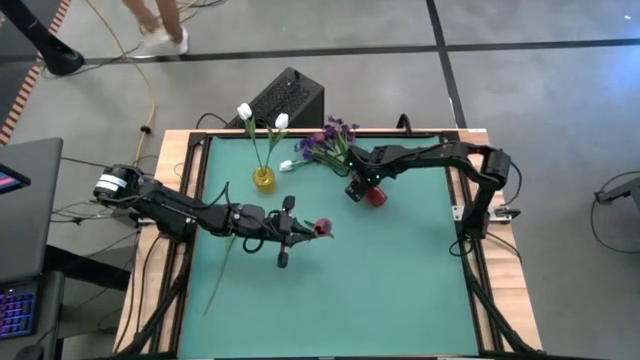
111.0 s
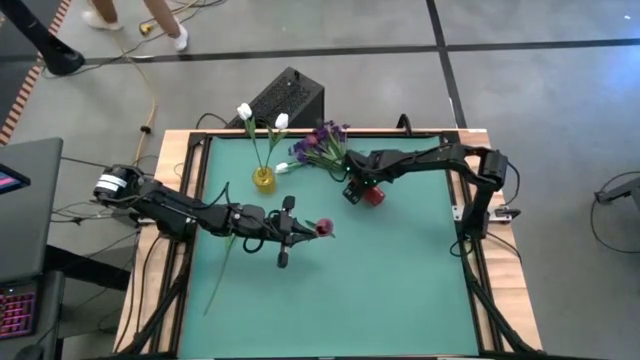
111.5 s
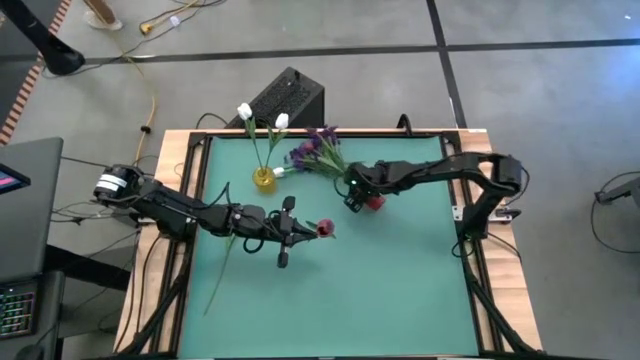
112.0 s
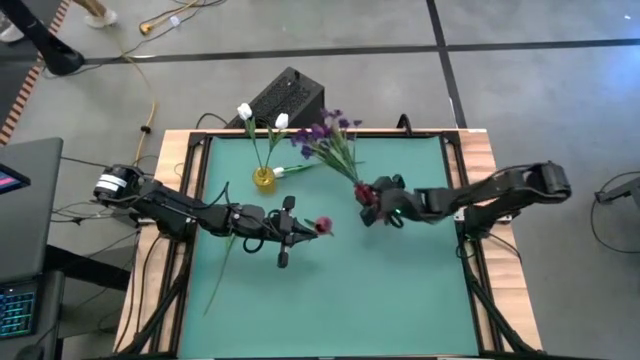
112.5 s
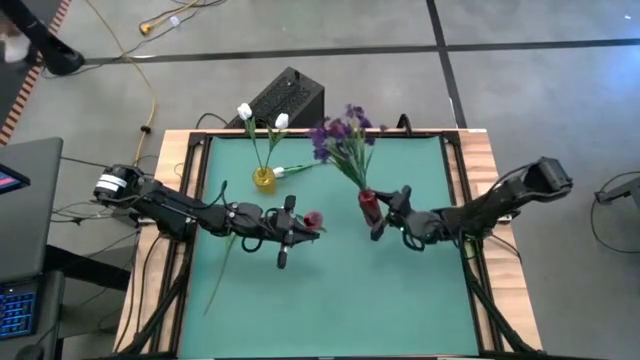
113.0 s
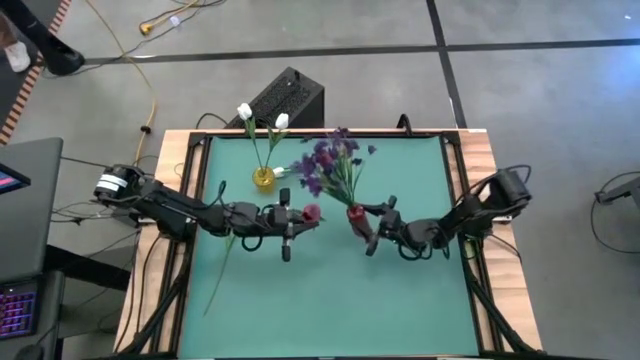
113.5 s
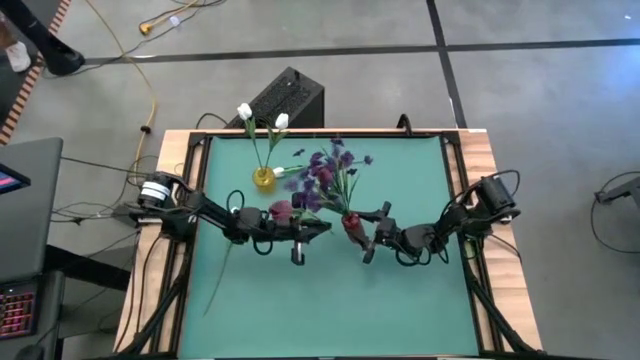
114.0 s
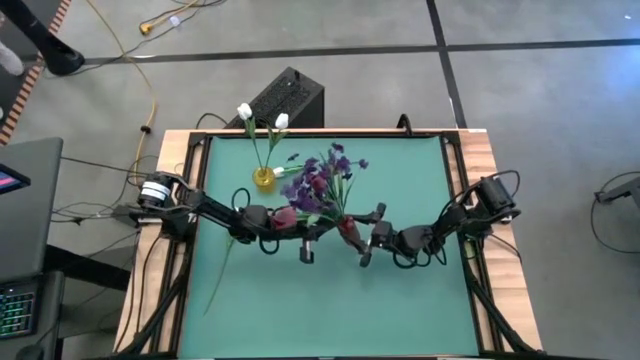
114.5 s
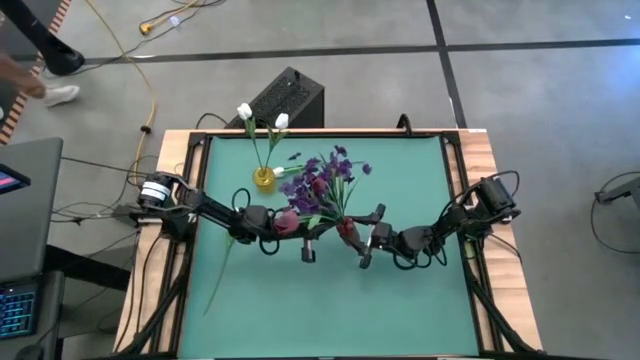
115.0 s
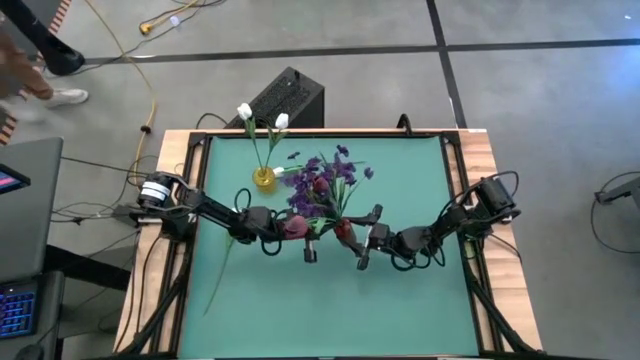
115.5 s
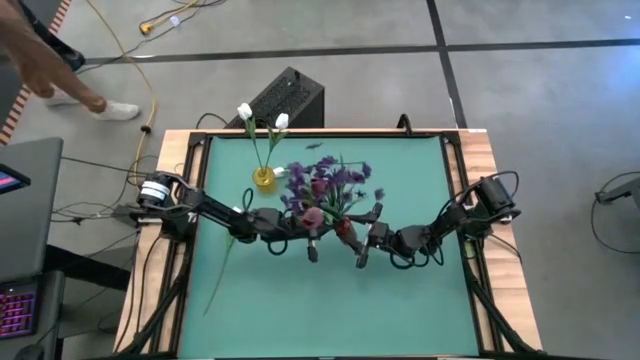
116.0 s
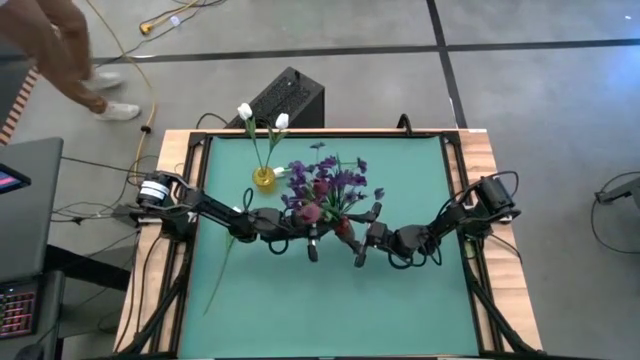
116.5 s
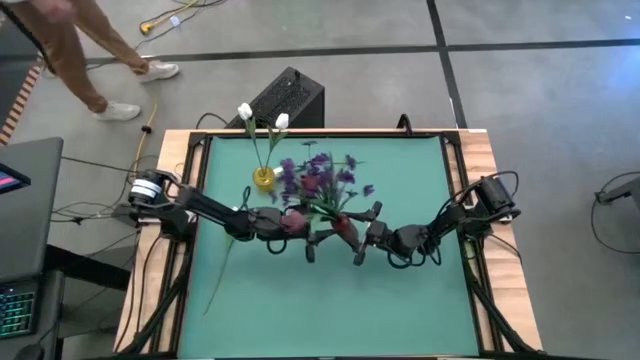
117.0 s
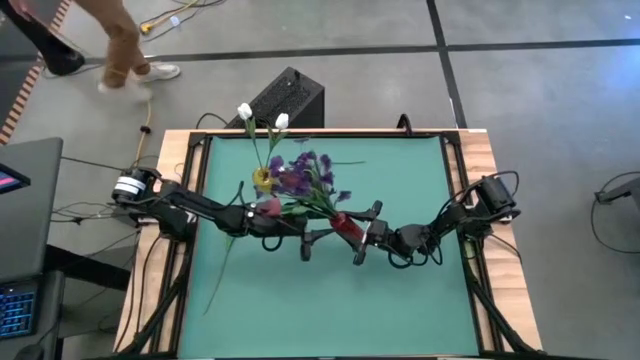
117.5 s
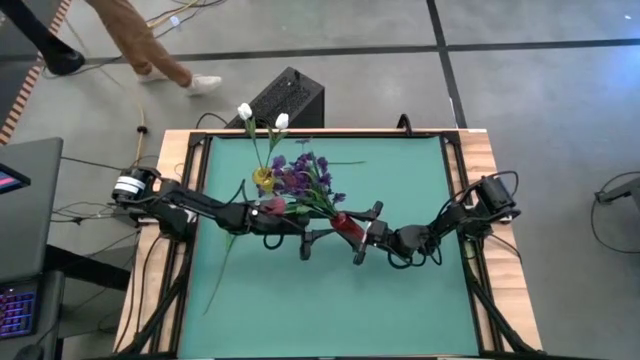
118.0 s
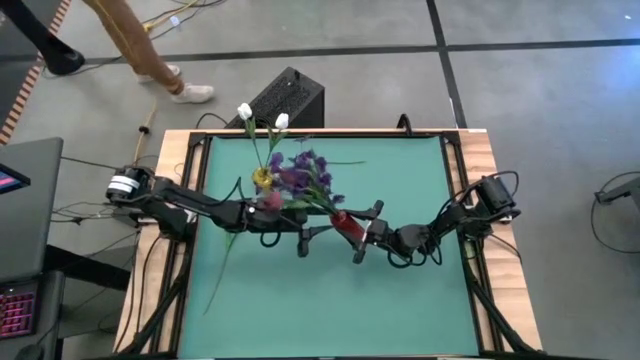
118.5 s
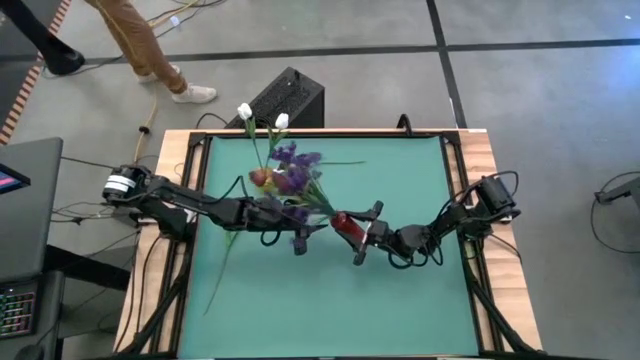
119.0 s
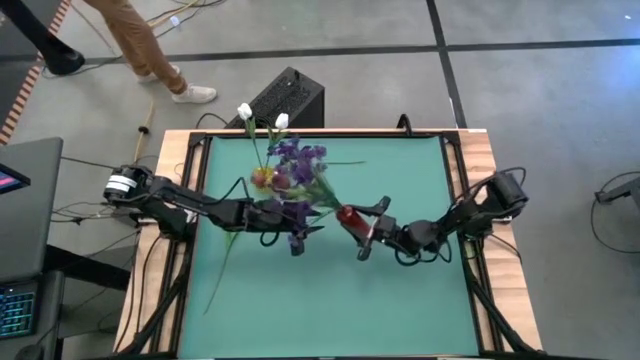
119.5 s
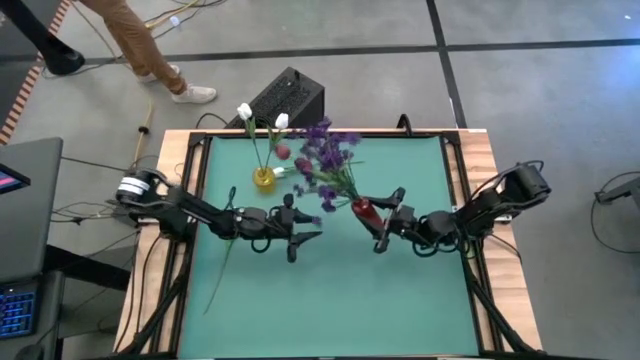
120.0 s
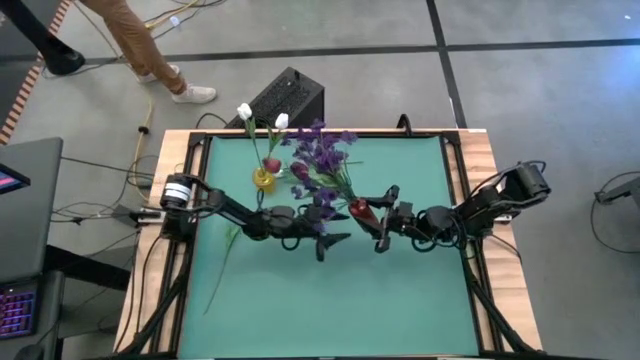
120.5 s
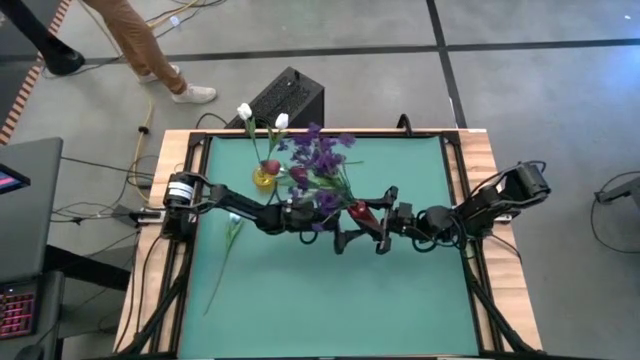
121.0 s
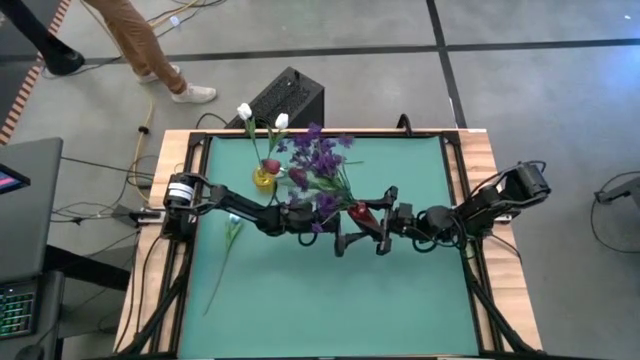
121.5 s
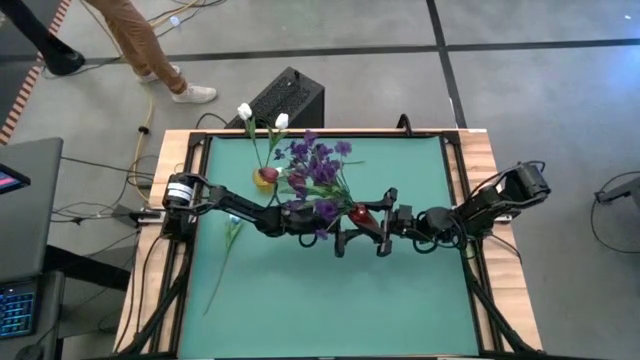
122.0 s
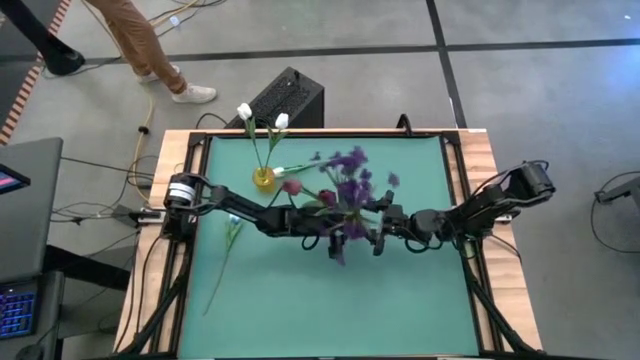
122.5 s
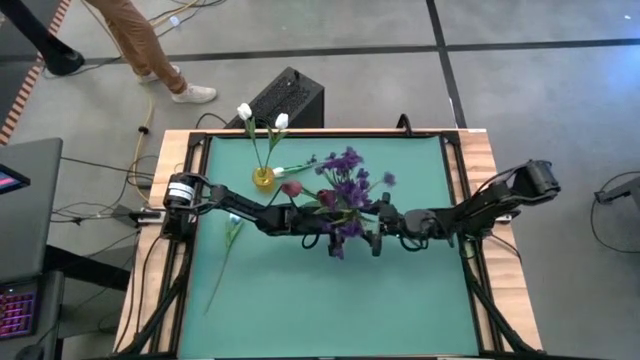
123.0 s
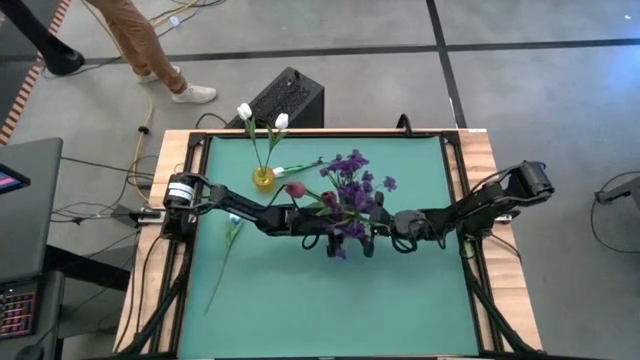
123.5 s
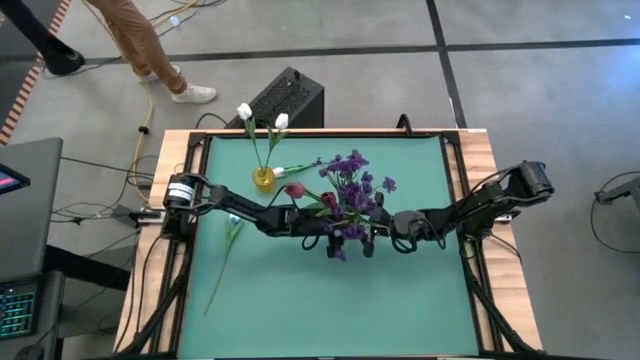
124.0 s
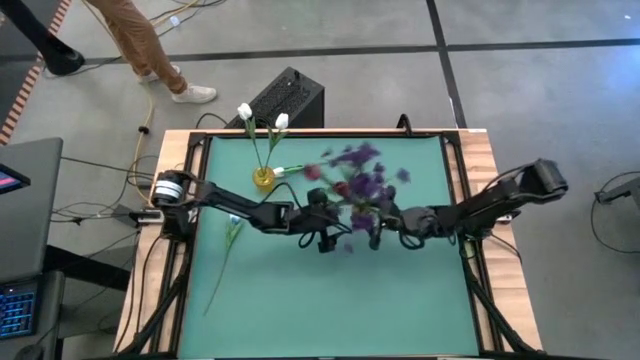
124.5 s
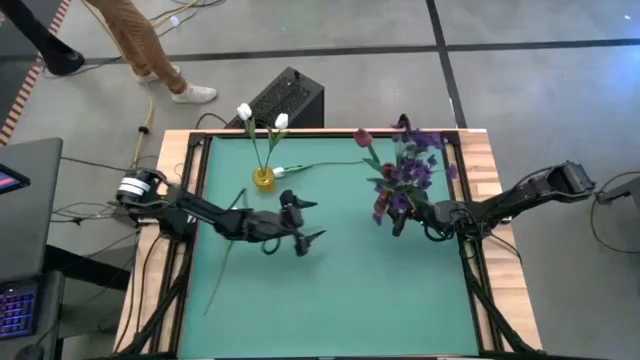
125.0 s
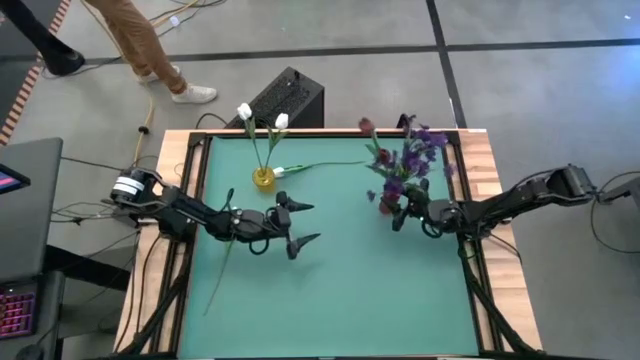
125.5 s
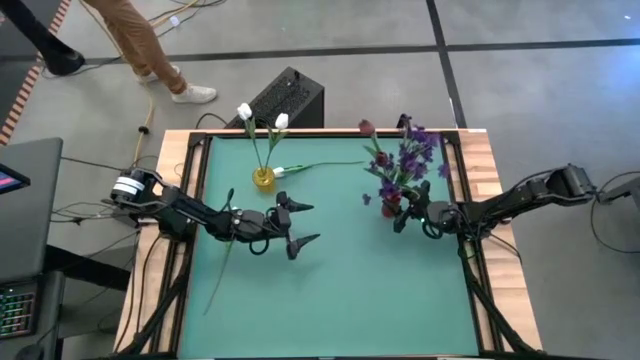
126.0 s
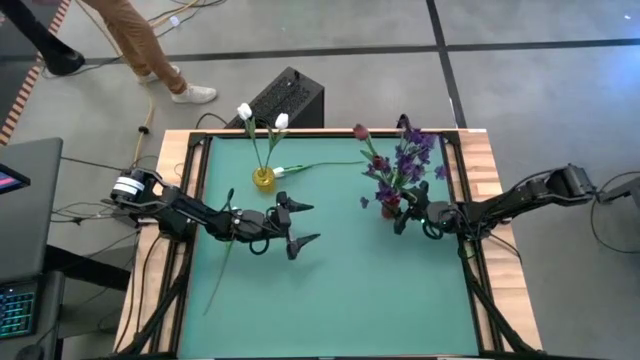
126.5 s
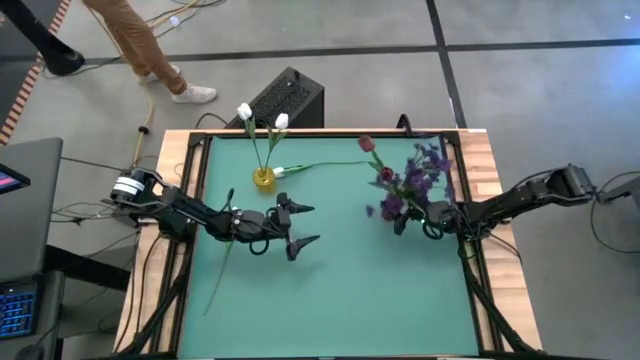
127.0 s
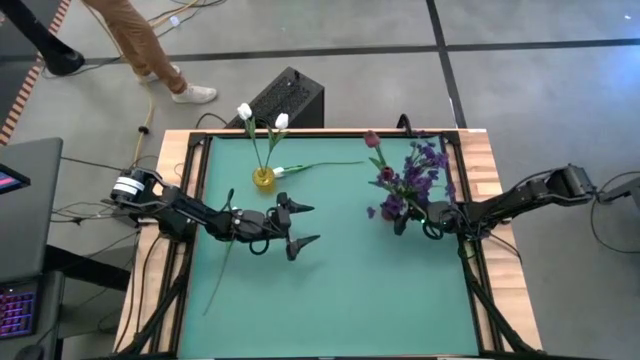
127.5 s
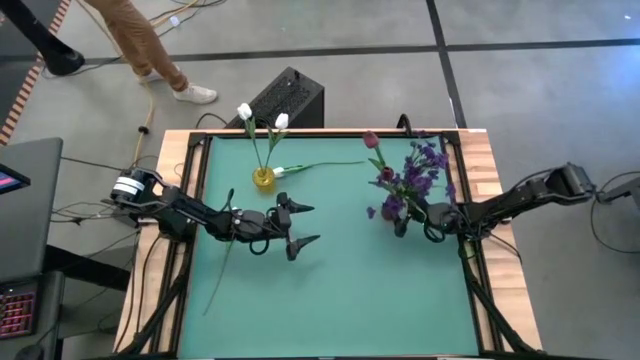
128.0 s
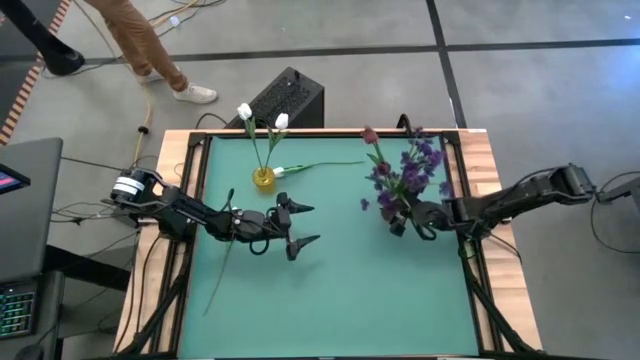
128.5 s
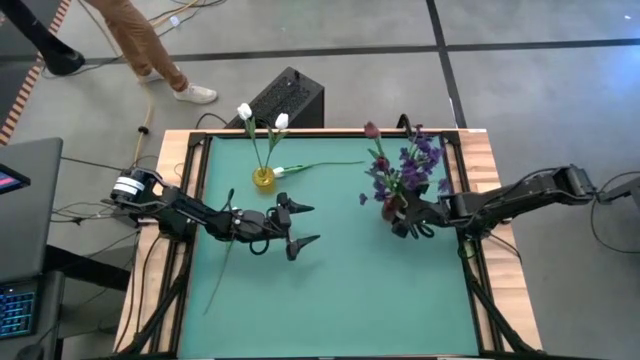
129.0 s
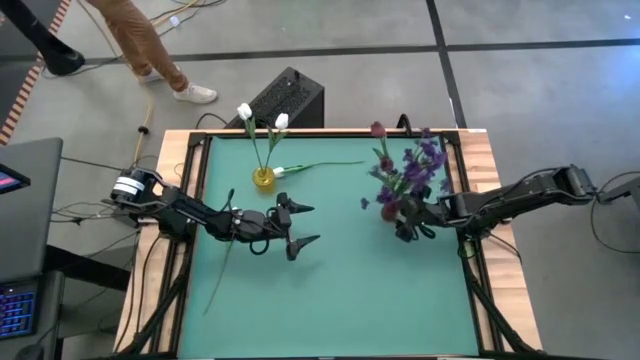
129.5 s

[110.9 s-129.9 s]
Task: Sort flowers into vase by color
Put the red flower into the red vase

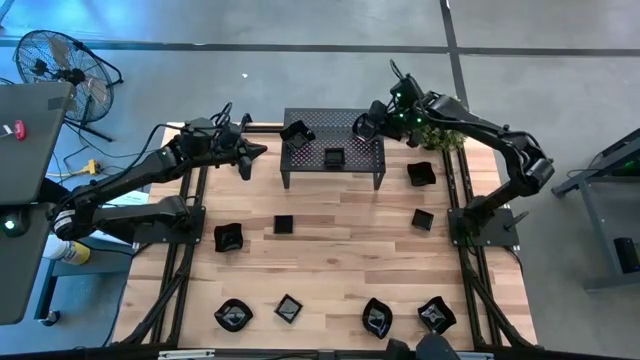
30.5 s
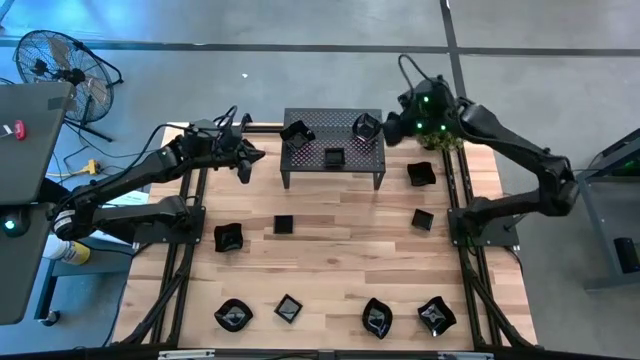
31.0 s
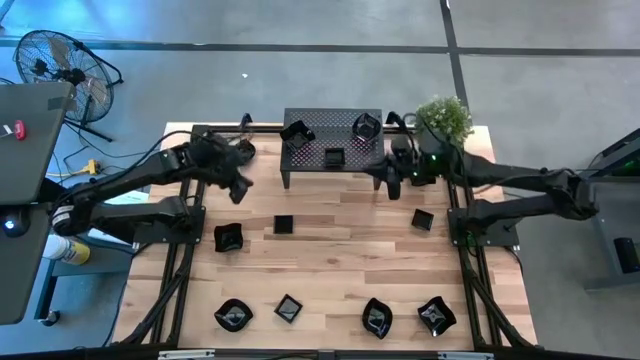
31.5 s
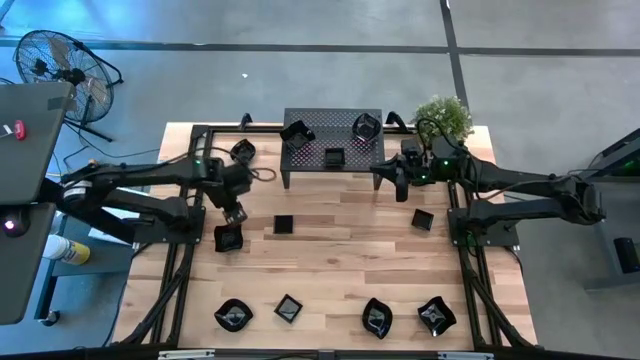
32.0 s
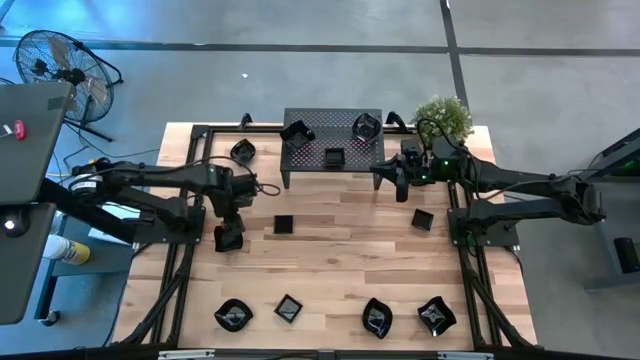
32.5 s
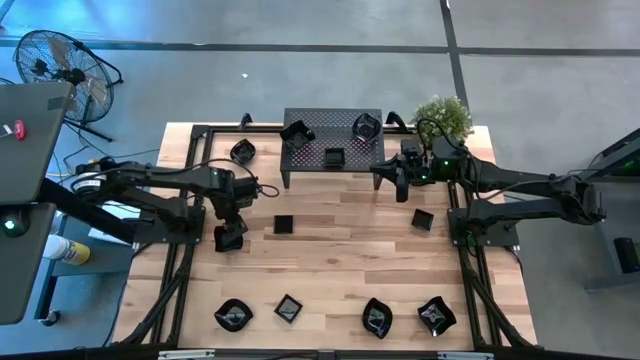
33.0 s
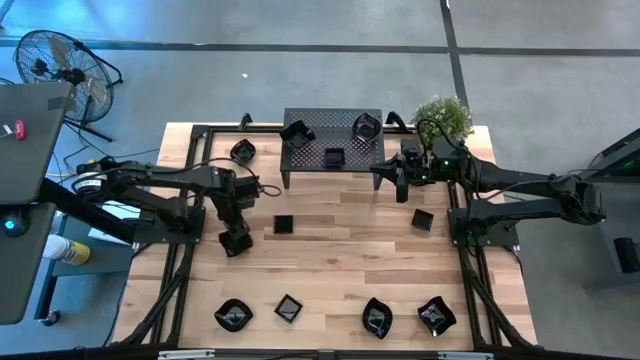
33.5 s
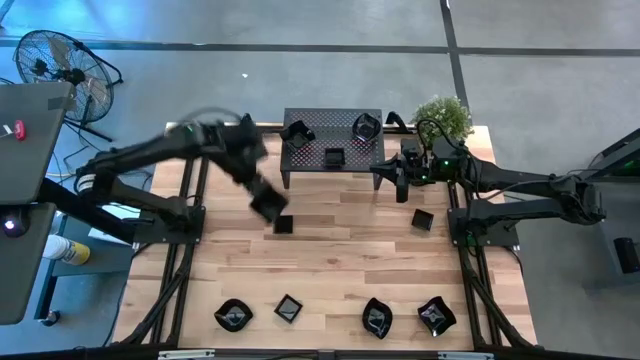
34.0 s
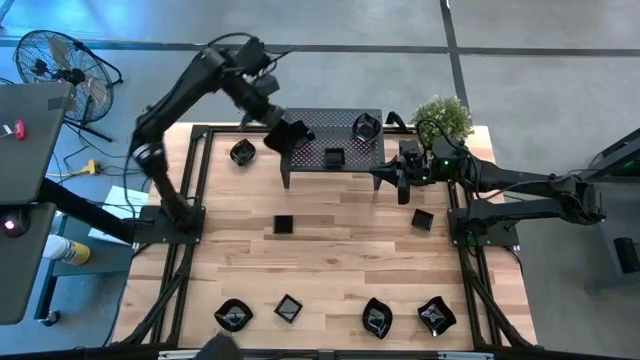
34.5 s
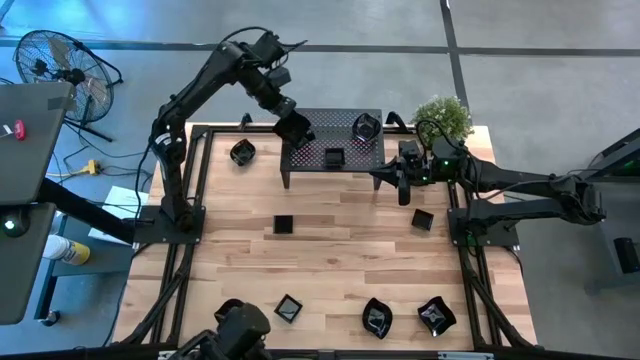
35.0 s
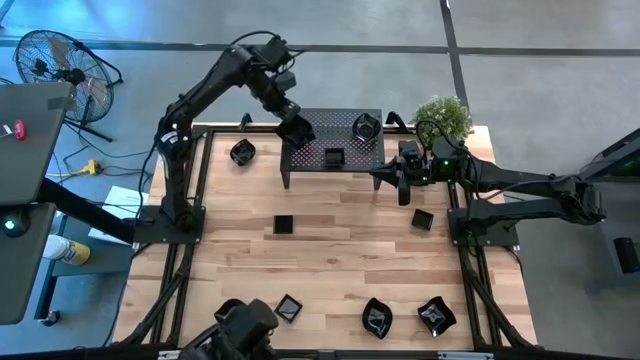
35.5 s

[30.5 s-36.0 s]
Task: Pick & Place Mini shaped plates
Stack the black distorted square plate on top of the black distorted square plate on the shelf
